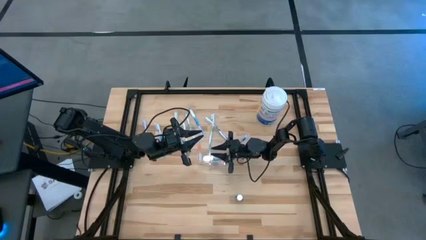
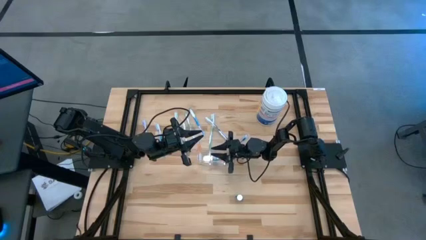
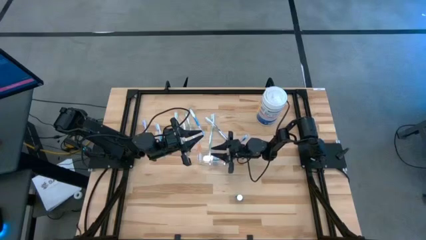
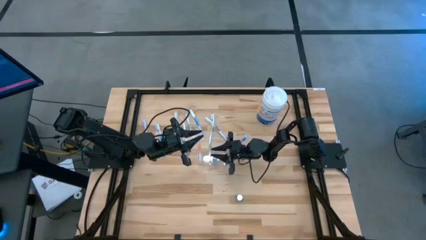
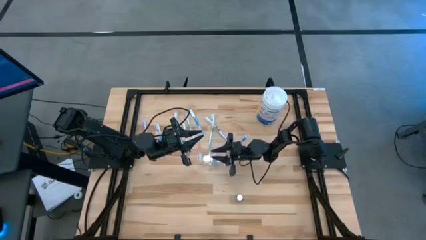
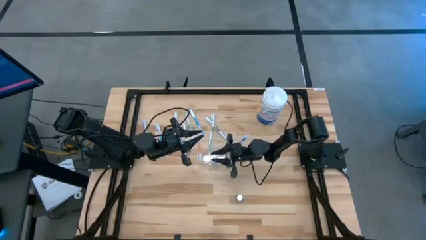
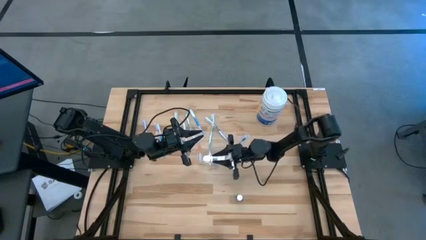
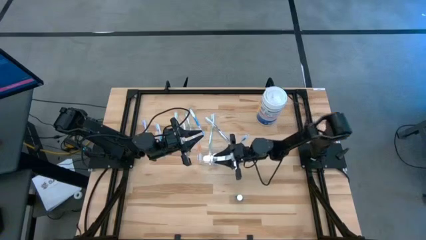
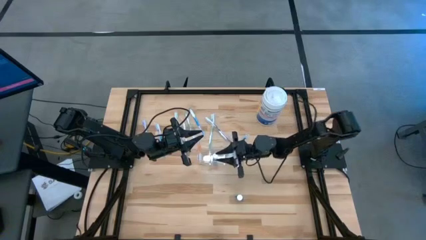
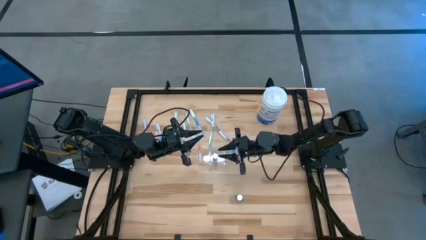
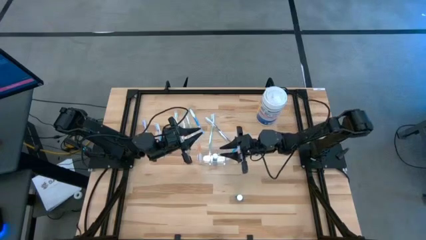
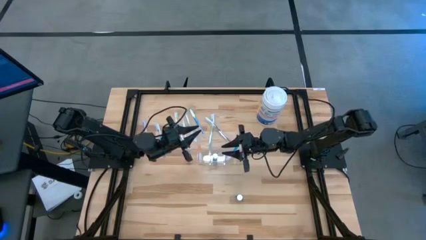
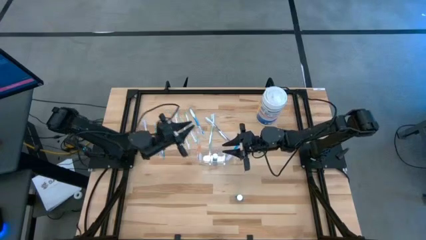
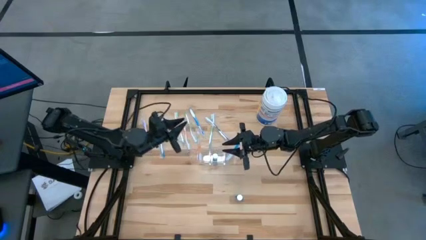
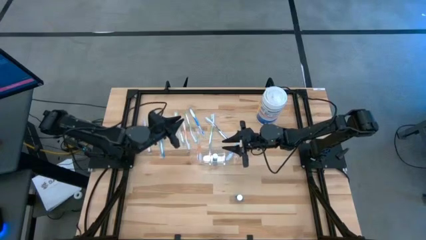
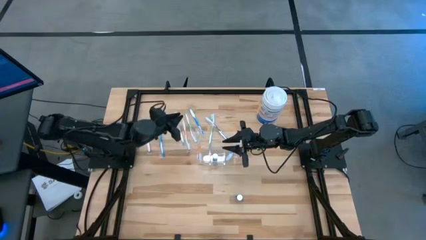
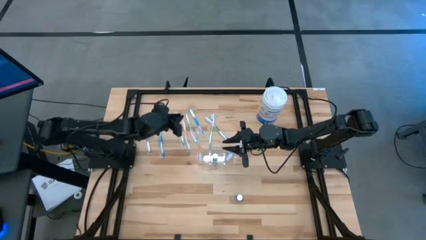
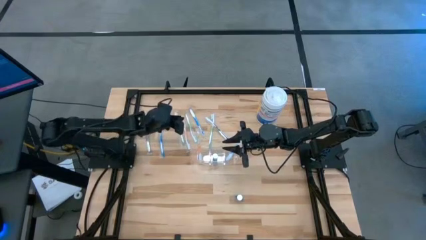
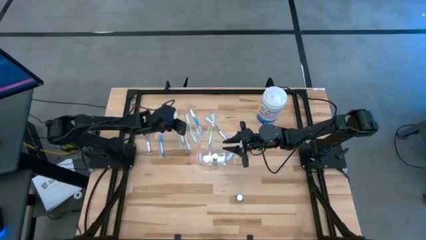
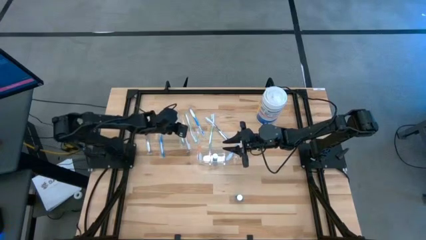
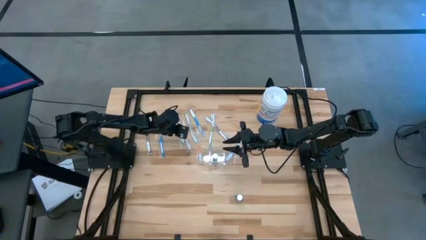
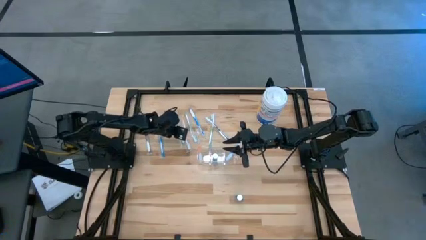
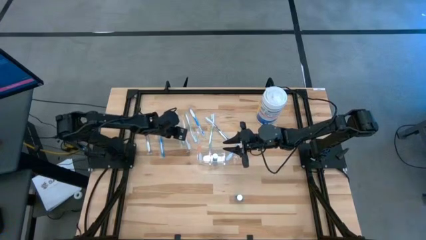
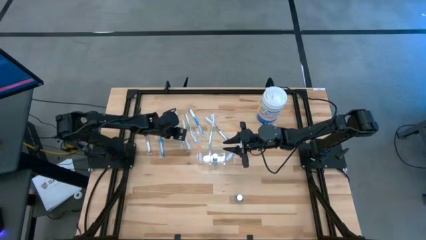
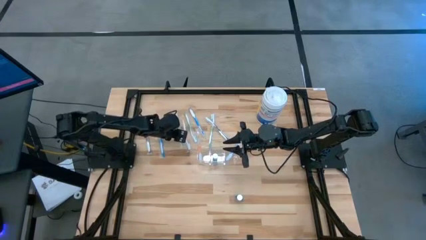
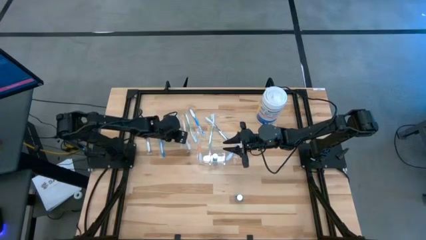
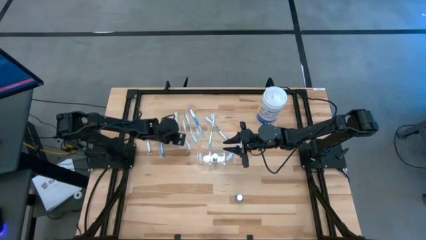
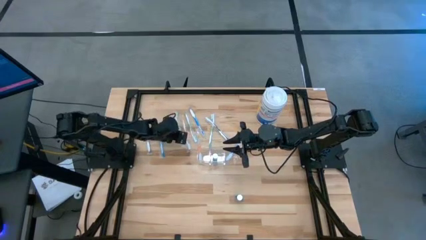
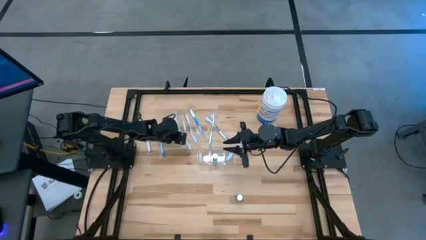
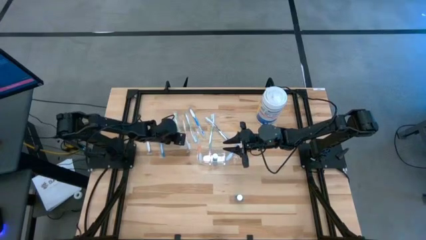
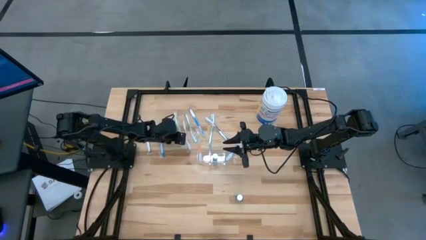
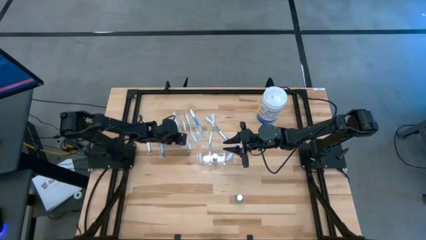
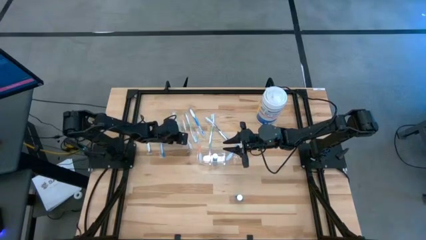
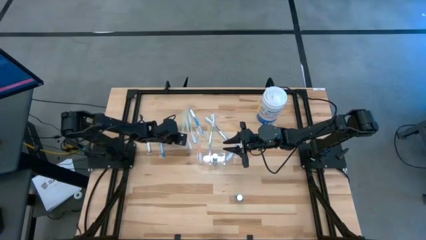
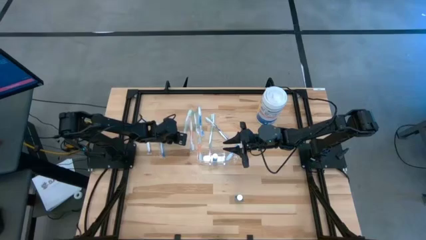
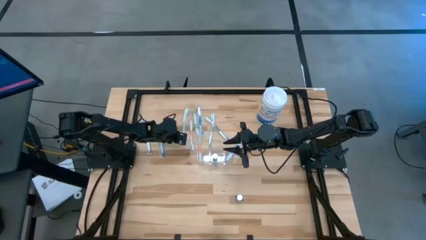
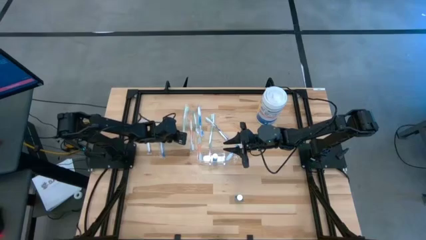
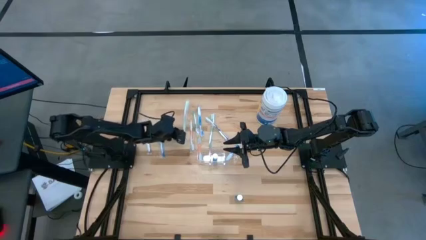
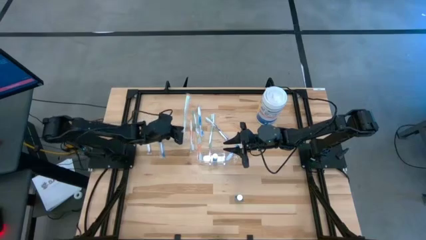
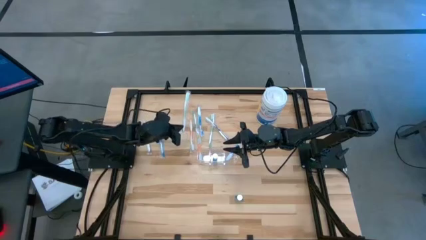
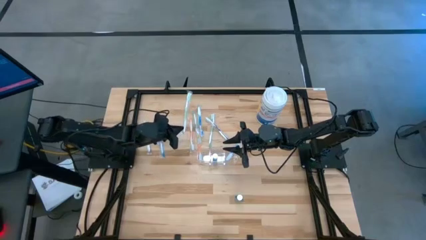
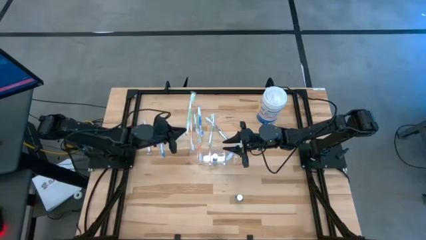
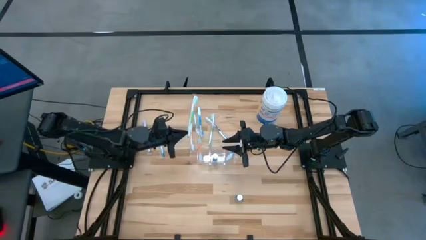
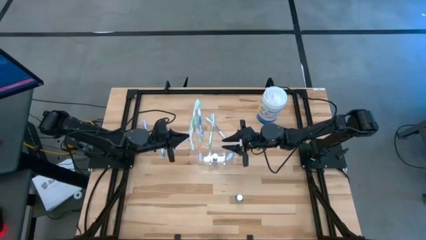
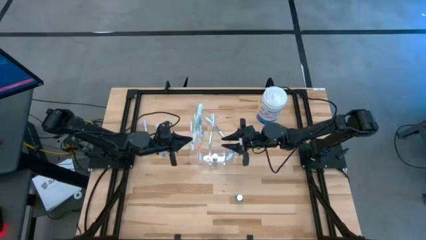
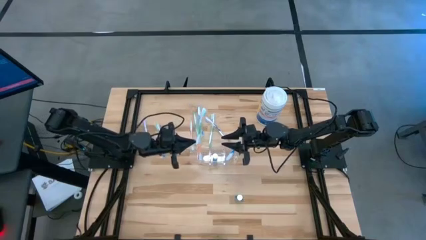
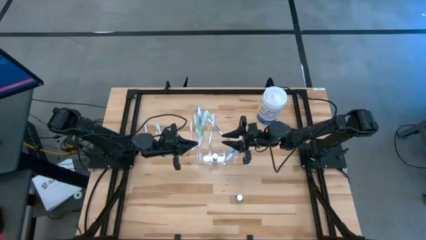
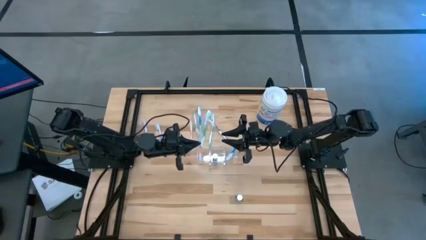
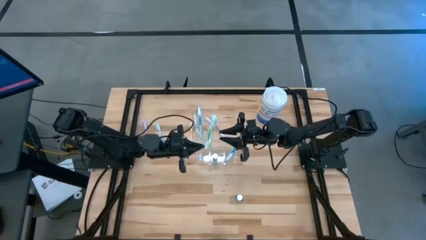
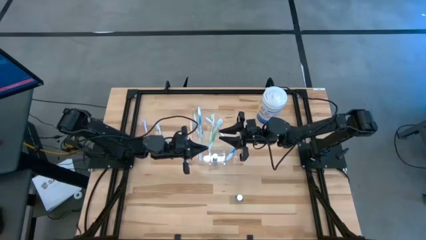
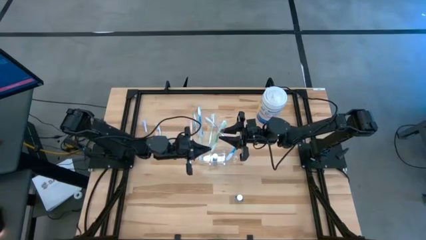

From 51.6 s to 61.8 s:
Task: Pick & Place toothbrushing station
Put the left green toothbrush into the transparent organizer

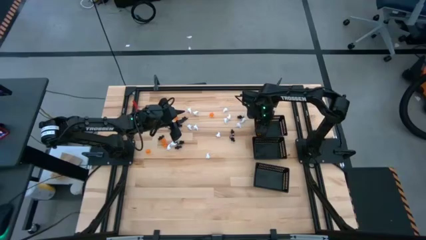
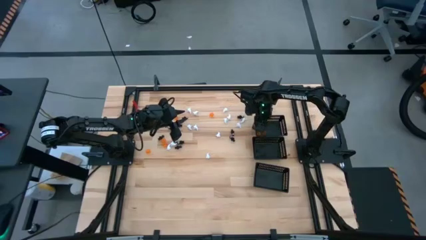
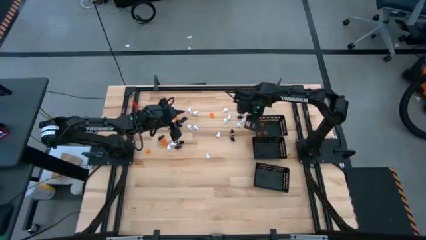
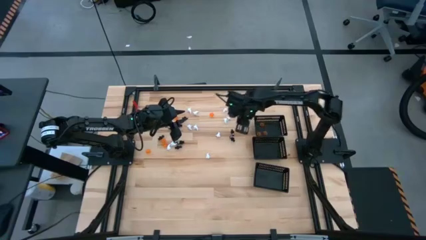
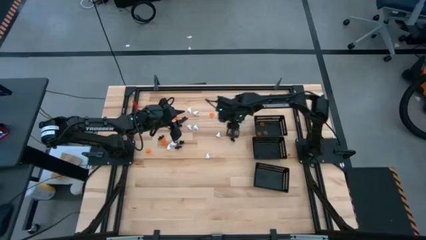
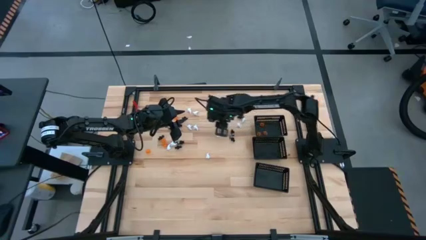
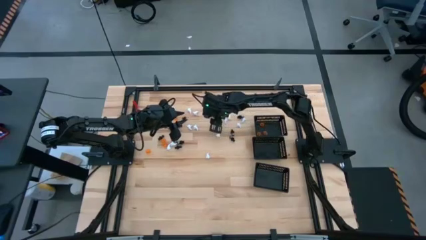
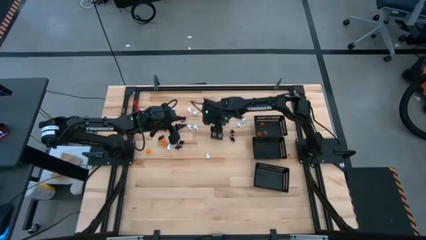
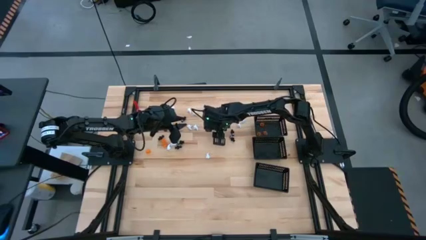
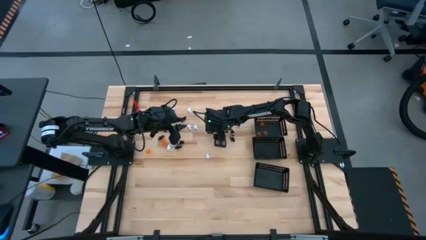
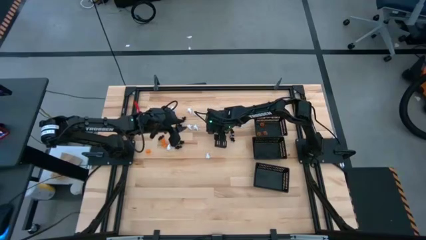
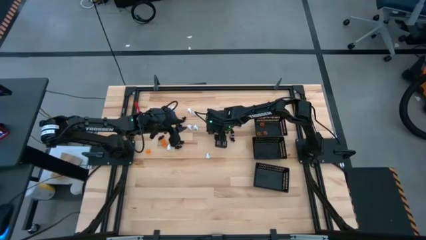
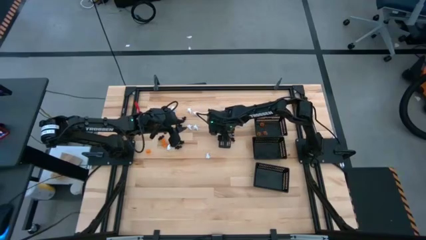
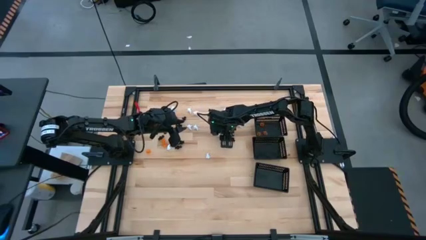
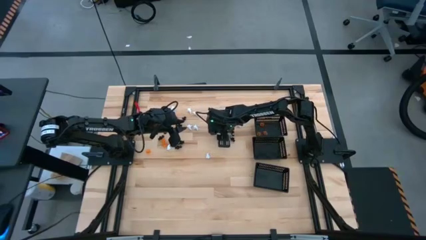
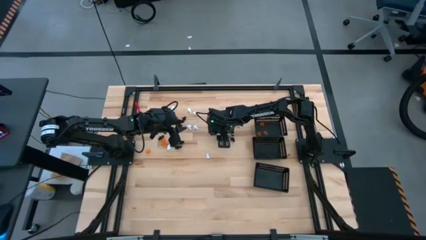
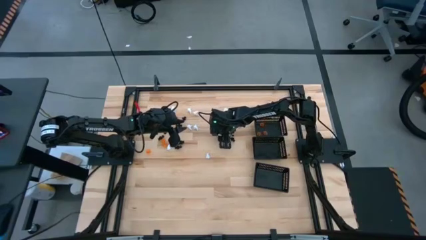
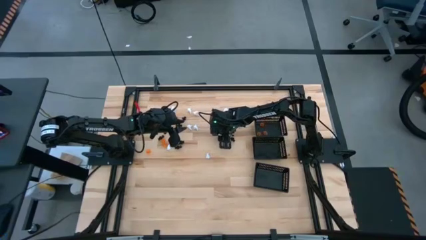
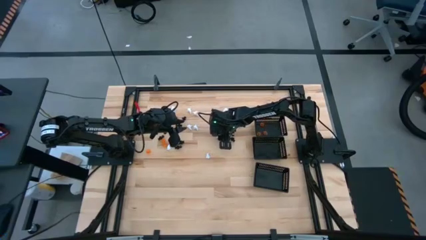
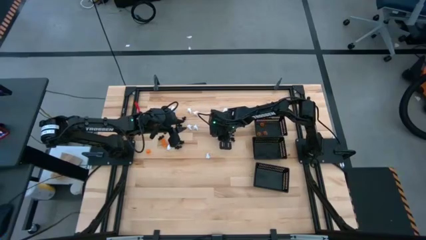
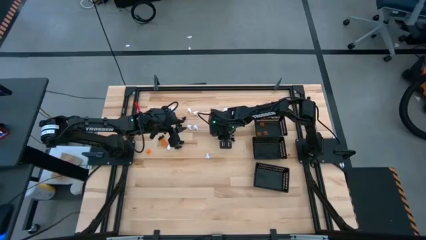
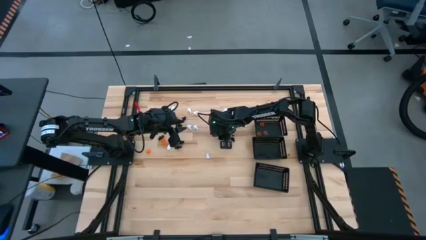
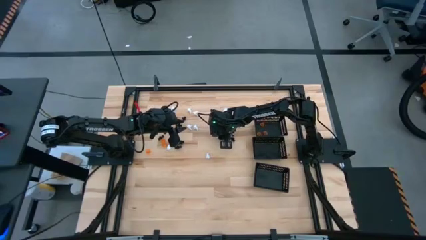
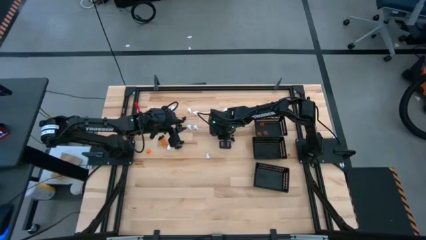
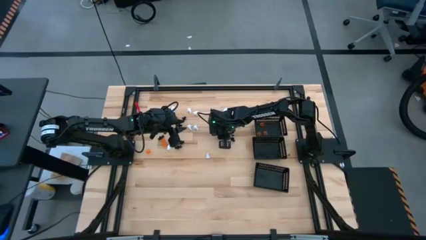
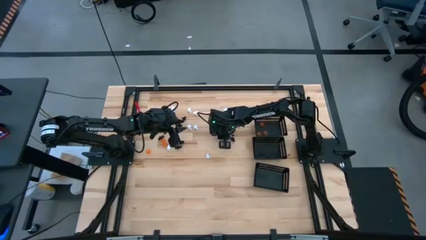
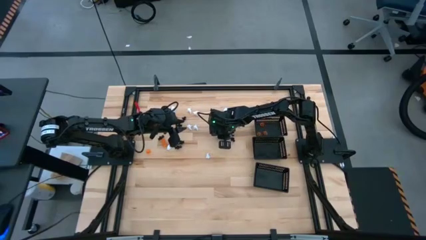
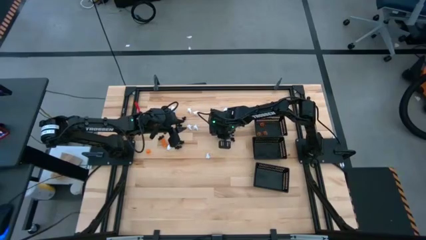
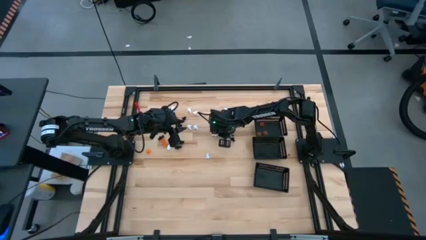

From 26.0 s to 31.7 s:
Task: Sort Halloween decoration
Put the white ghost toy into the center black bin
